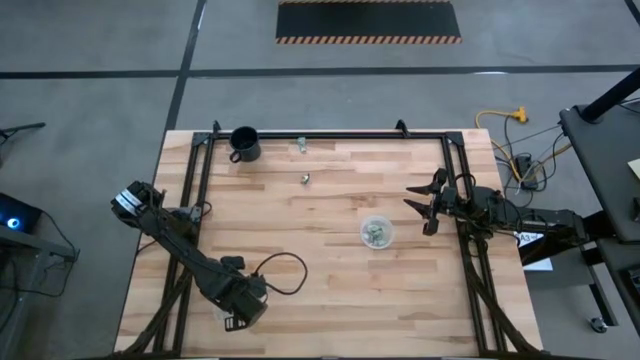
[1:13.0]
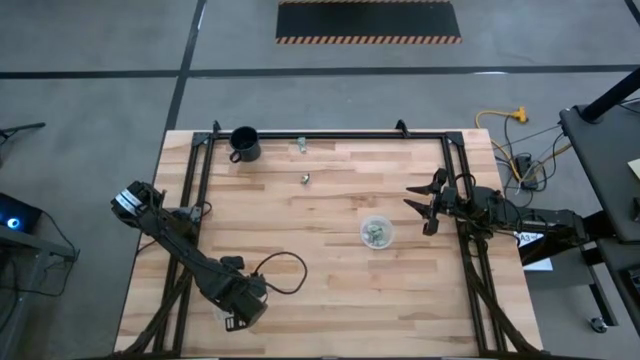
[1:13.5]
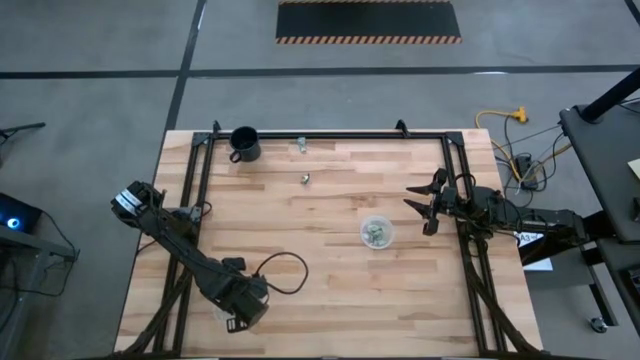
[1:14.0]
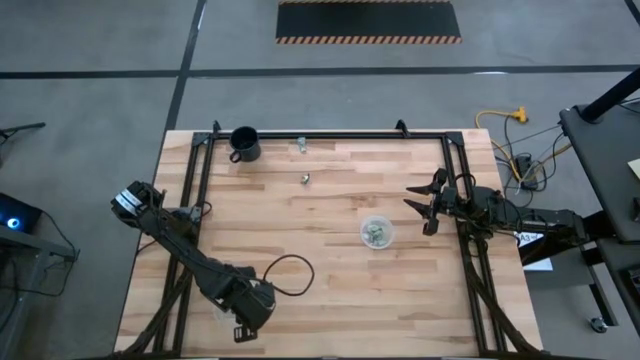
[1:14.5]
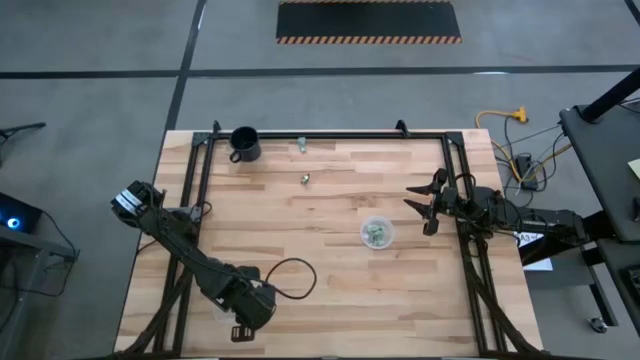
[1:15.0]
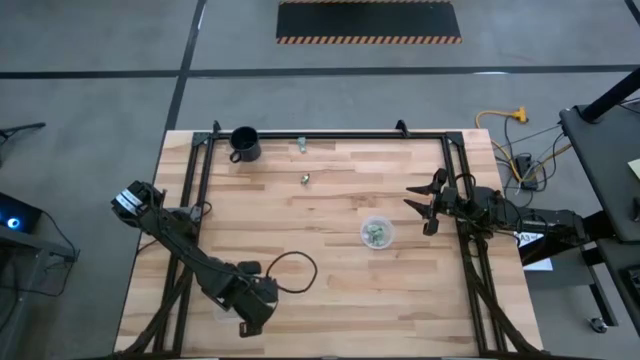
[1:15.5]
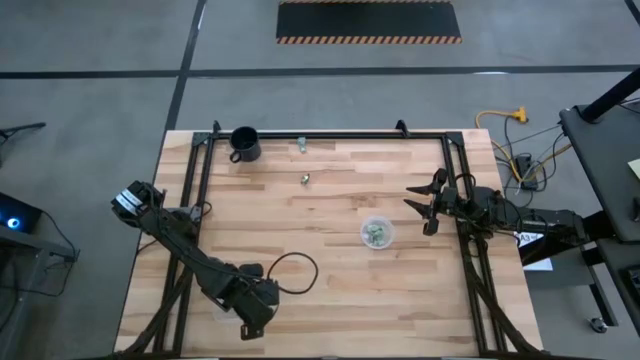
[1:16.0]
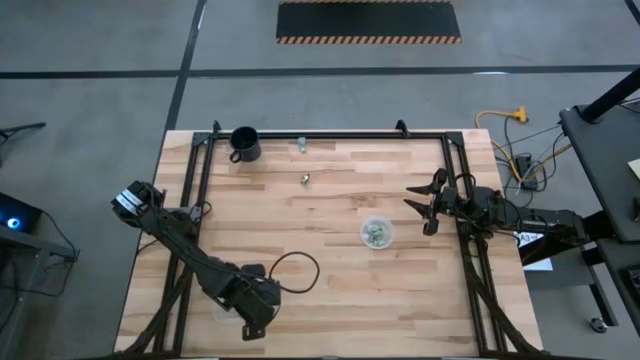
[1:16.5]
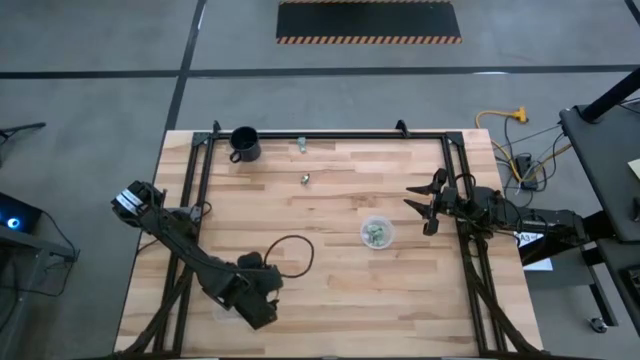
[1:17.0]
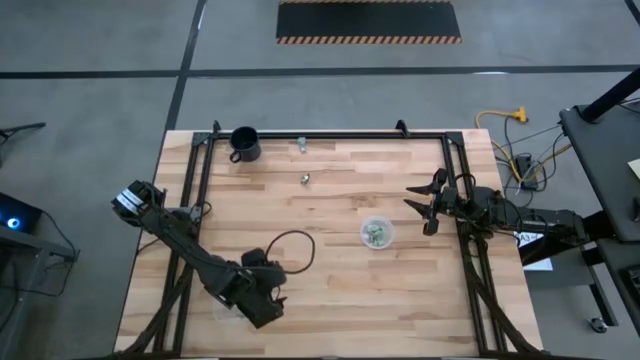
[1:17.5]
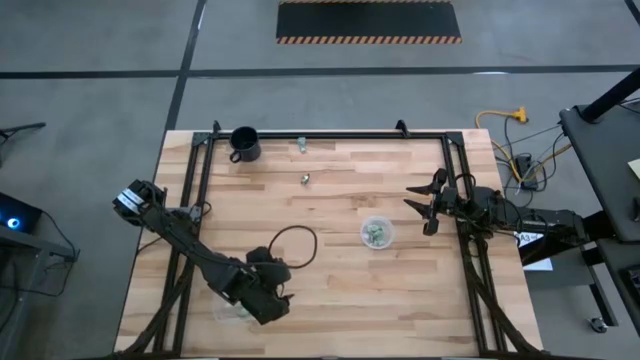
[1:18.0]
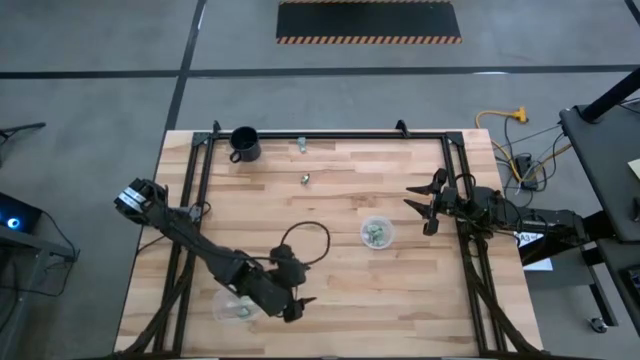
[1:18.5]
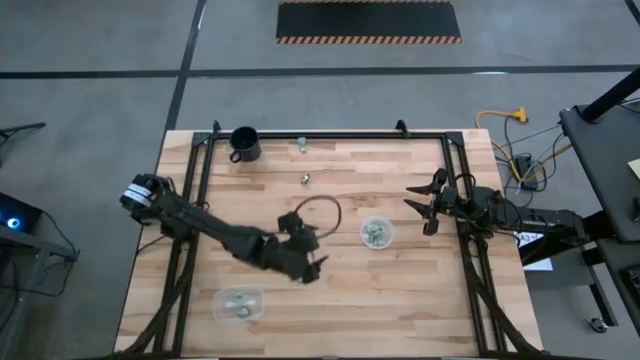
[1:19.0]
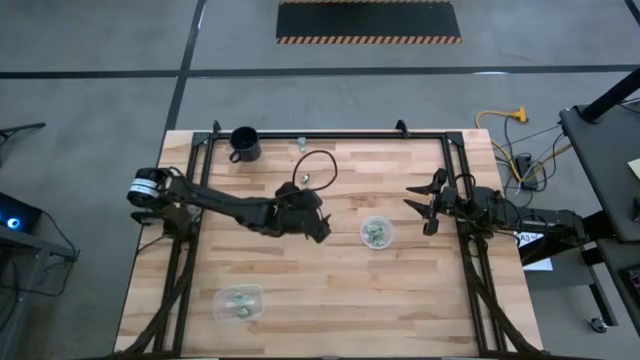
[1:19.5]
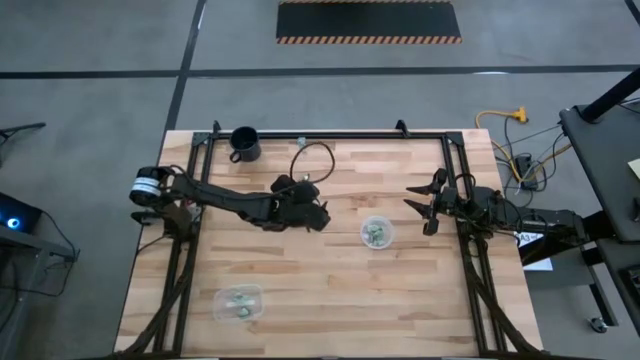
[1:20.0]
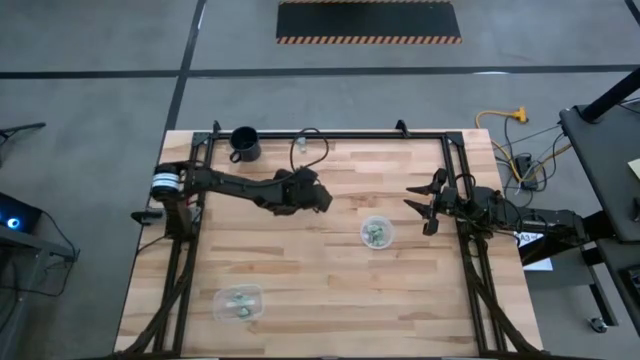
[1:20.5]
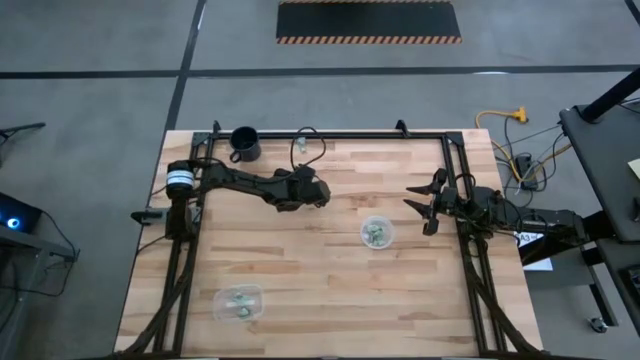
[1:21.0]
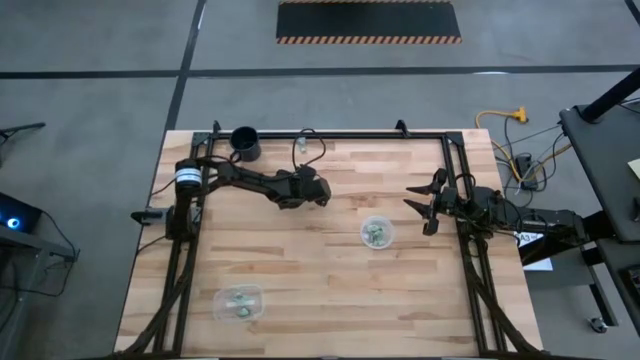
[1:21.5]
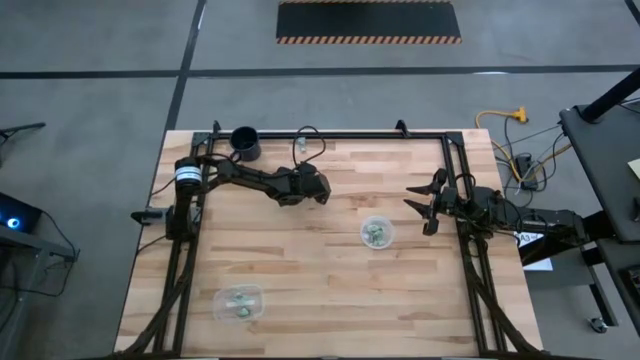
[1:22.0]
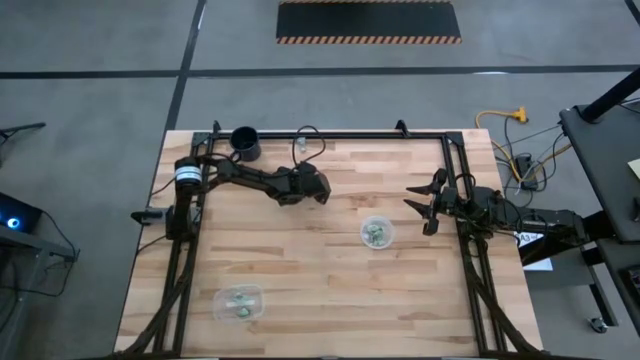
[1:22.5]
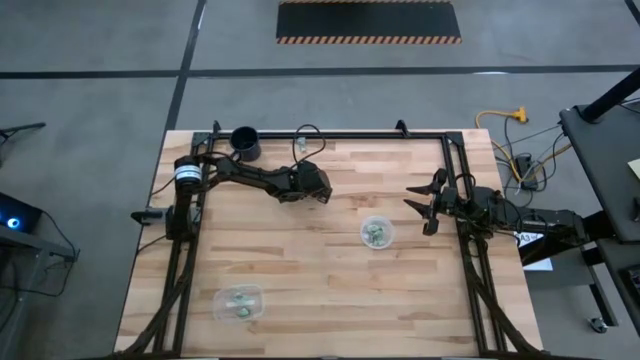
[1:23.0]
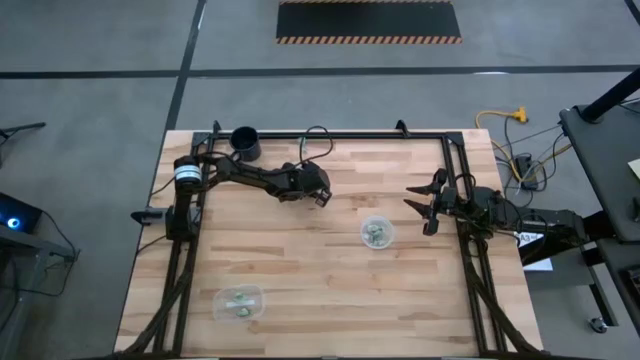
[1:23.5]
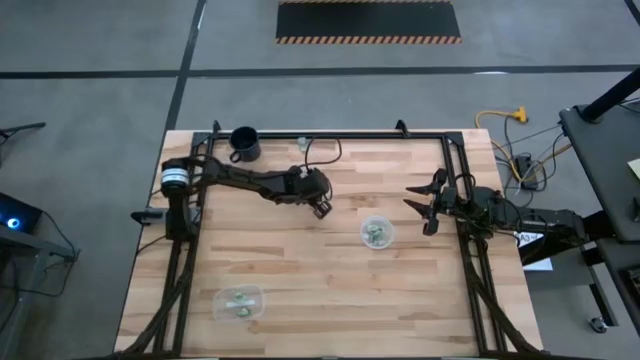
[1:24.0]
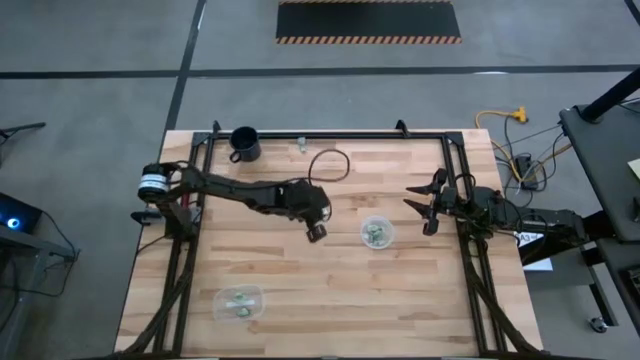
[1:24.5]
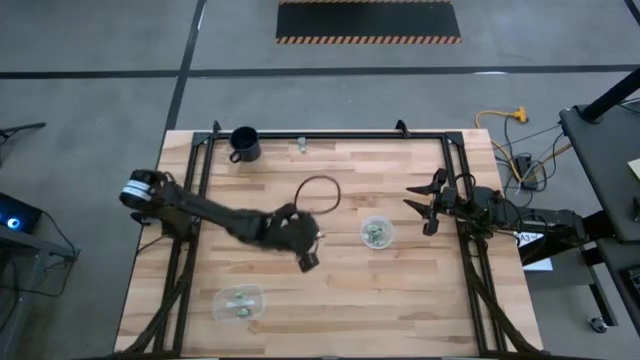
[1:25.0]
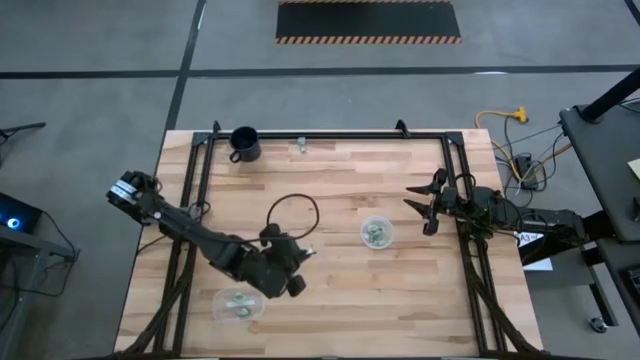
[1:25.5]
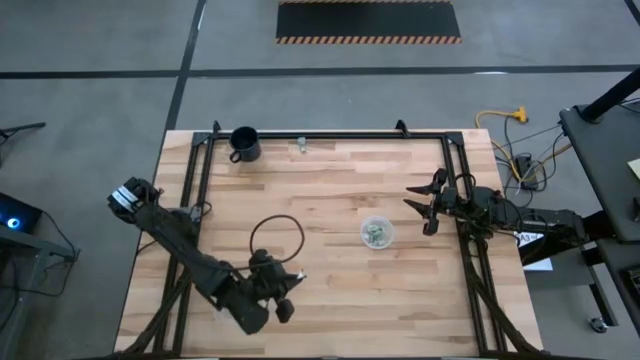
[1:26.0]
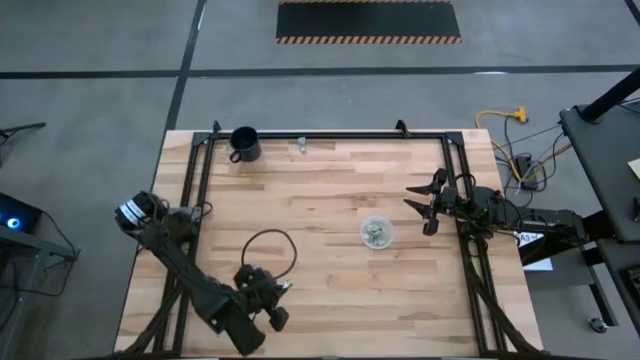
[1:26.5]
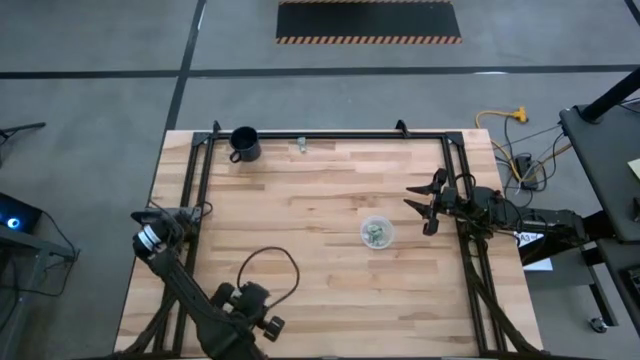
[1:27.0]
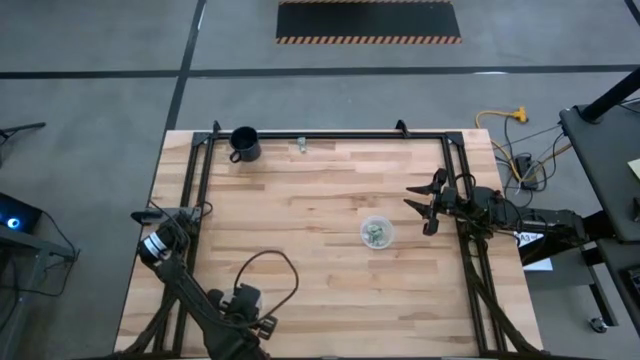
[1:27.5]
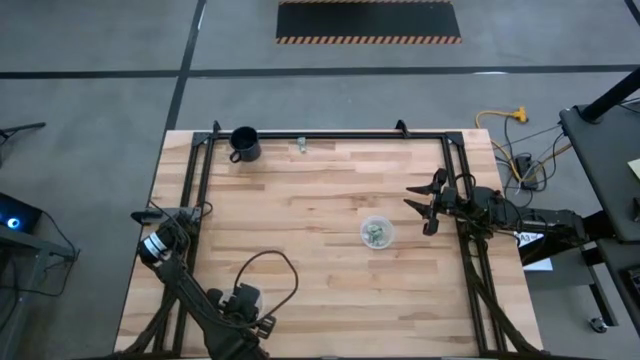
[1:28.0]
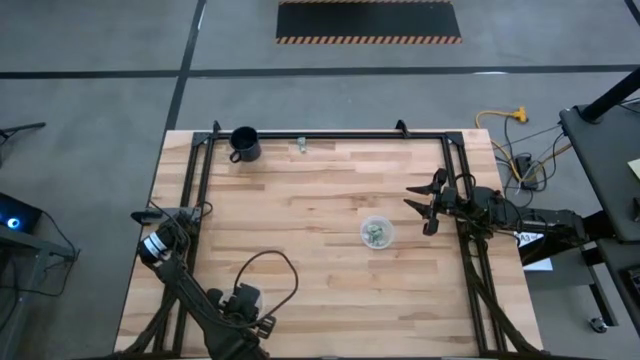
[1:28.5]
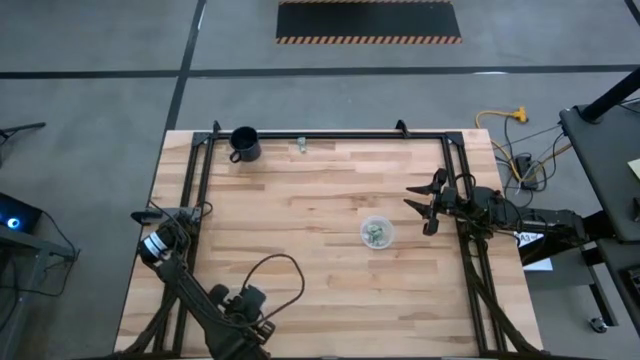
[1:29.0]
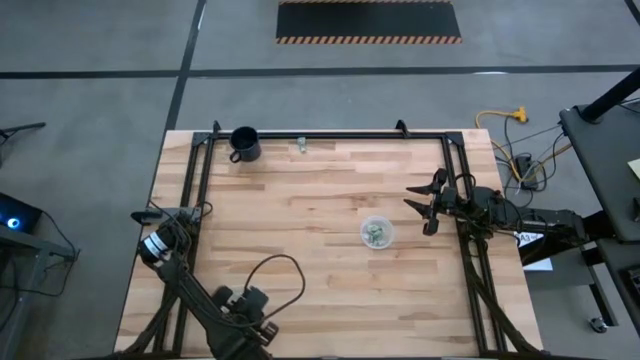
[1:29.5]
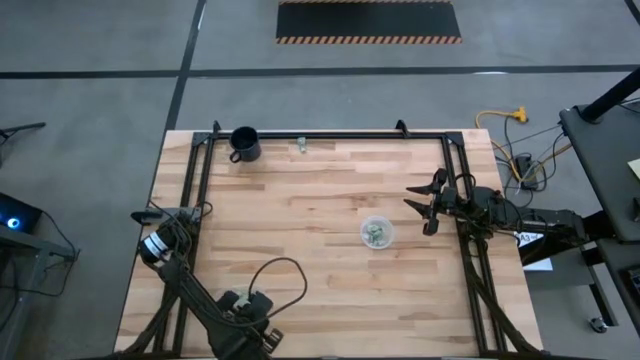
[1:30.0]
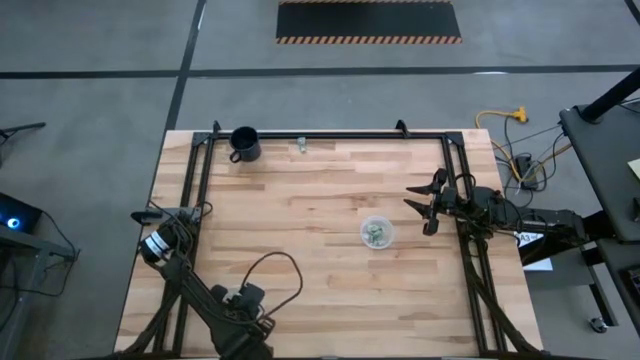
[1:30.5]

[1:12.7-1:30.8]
Task: Pick and place Stevia / Truvia into bins
Put the green truvia packet into the left transparent container

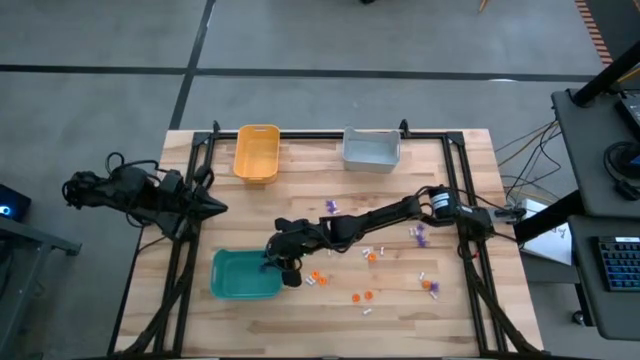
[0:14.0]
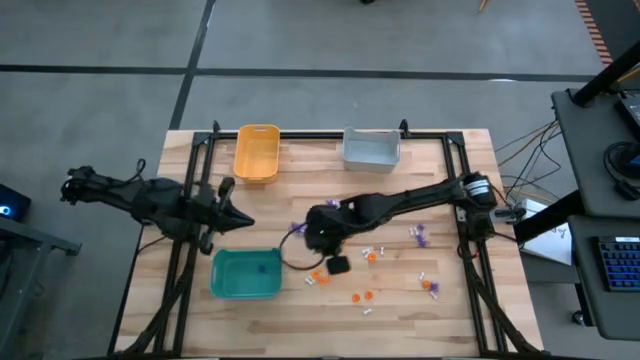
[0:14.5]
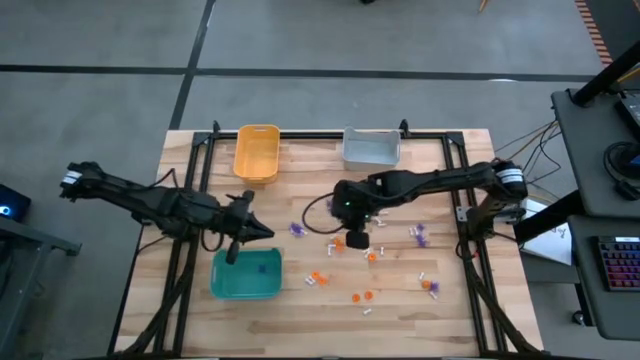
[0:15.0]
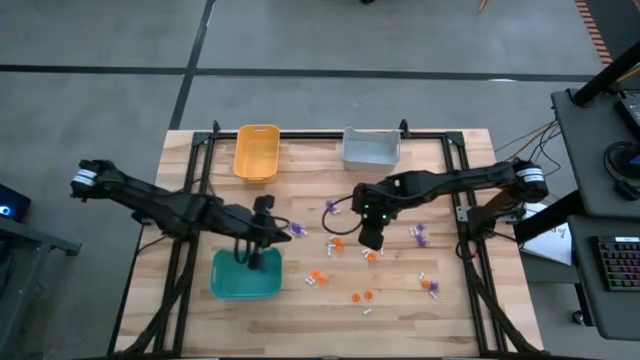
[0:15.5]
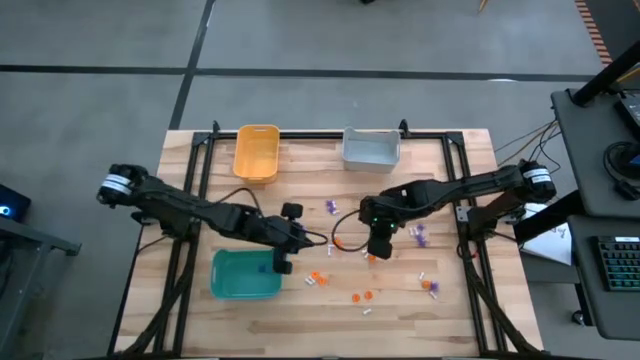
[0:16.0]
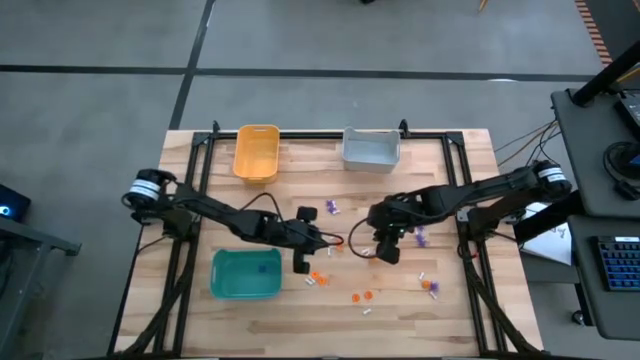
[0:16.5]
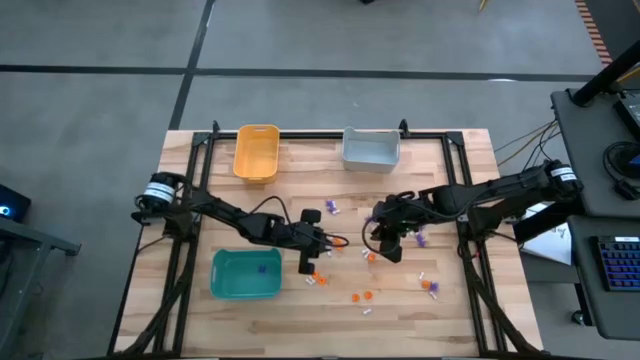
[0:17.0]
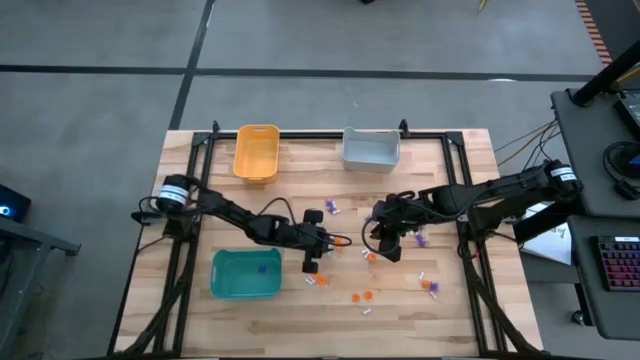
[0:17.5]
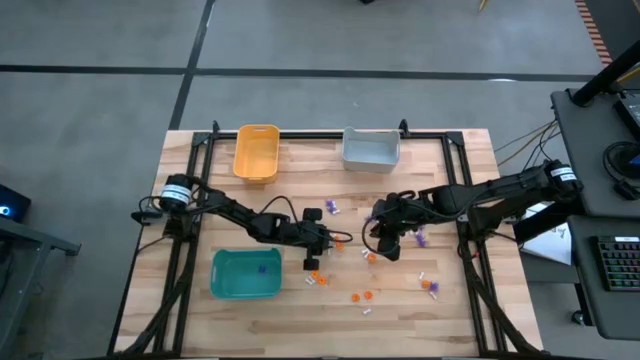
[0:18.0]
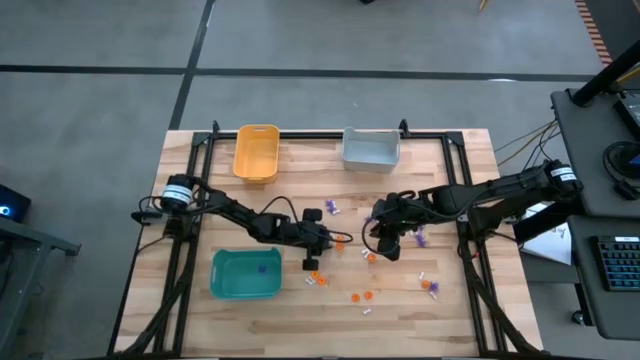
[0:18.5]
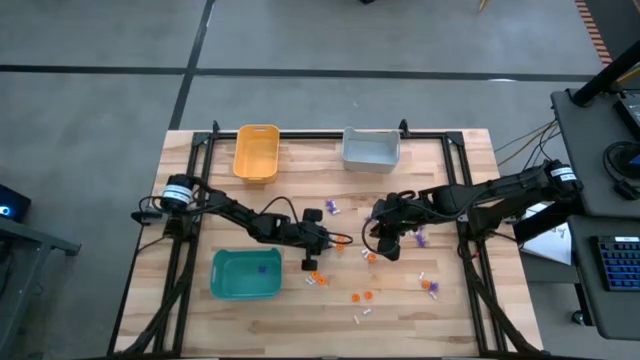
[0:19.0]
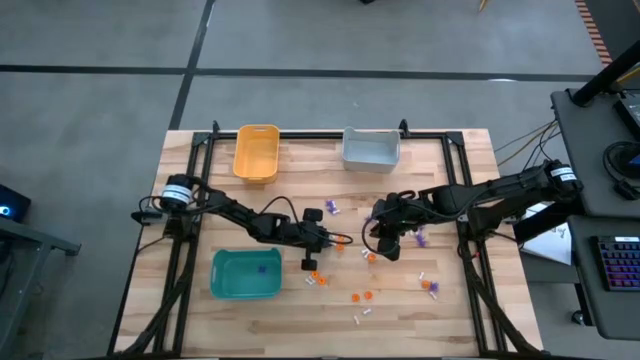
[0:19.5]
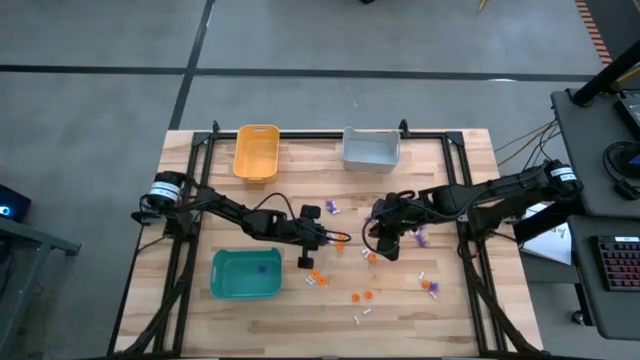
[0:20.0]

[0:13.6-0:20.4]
Task: Sort Halloween decoration
Put the white bone toy into the orange bin
